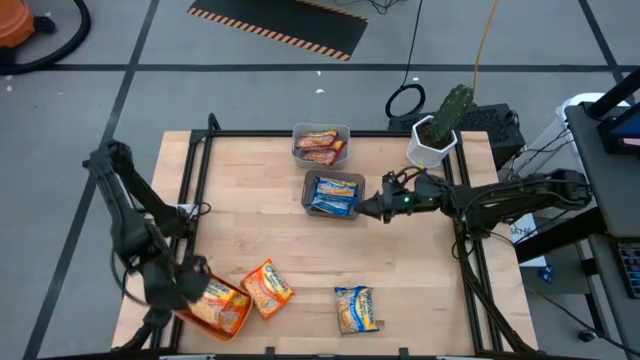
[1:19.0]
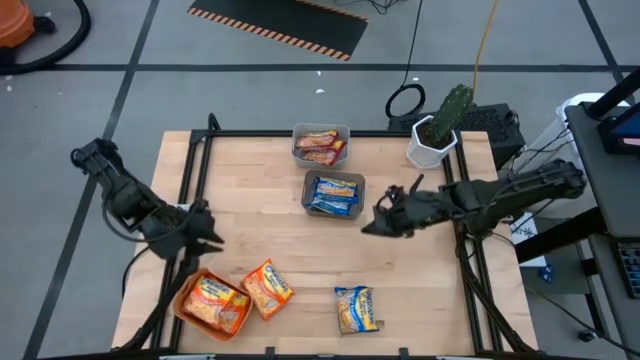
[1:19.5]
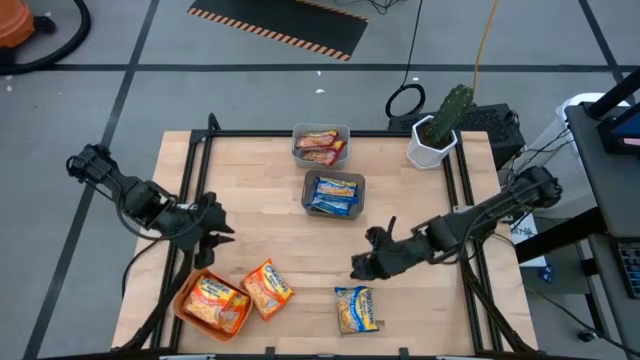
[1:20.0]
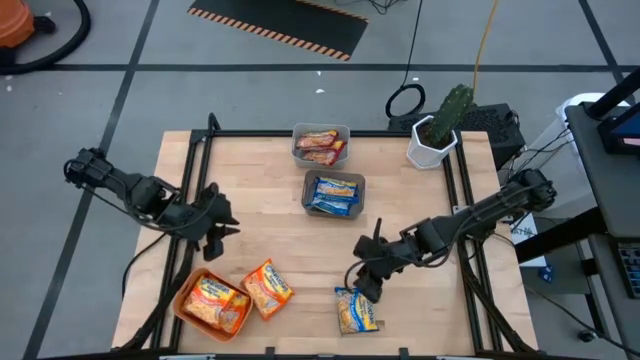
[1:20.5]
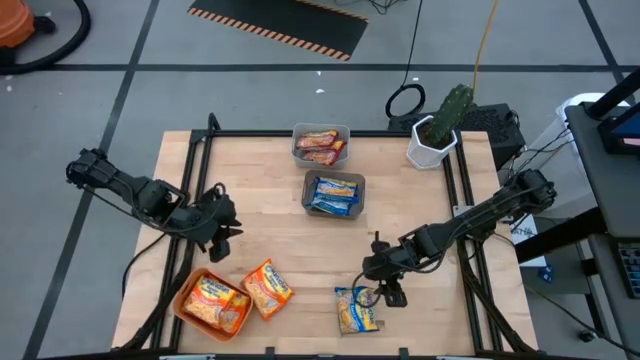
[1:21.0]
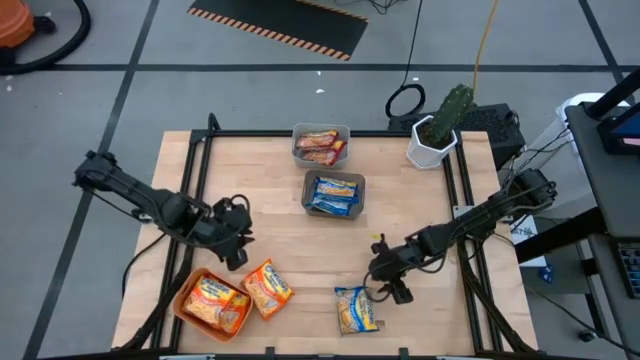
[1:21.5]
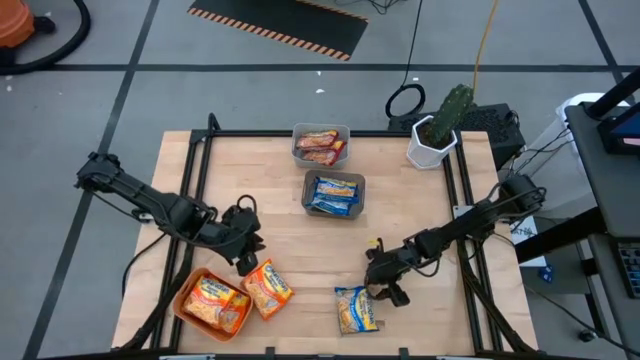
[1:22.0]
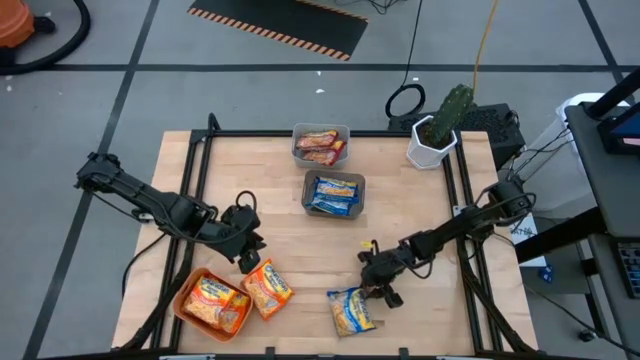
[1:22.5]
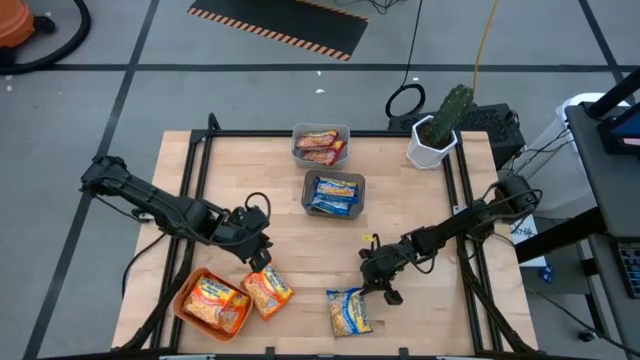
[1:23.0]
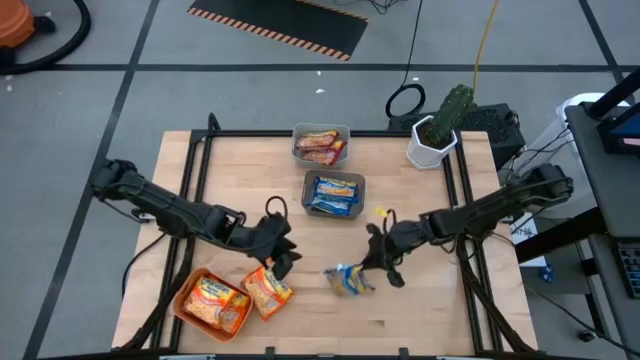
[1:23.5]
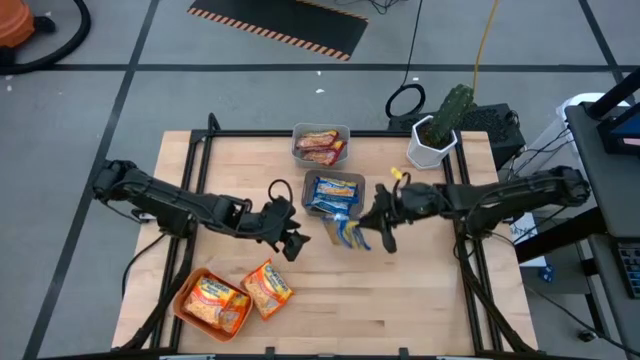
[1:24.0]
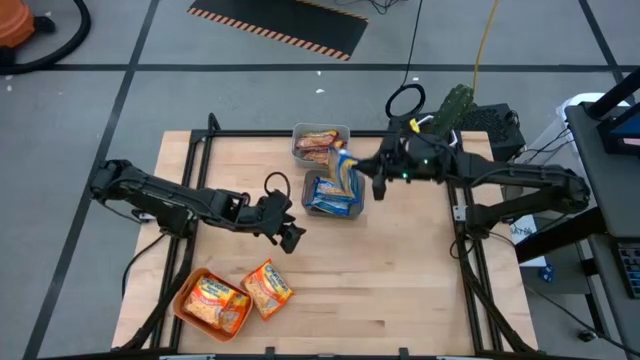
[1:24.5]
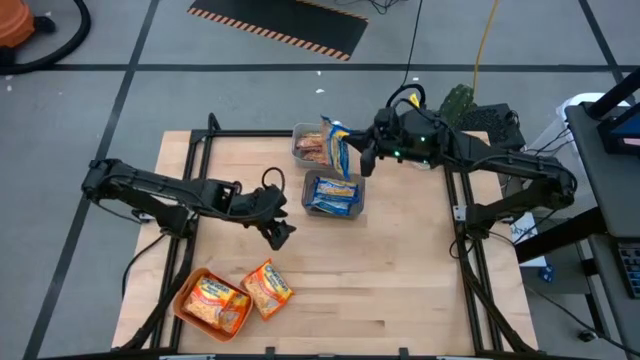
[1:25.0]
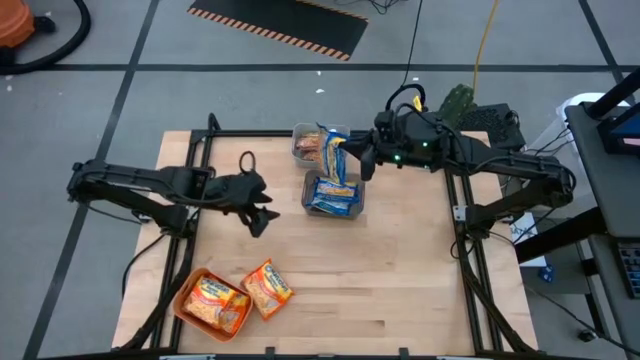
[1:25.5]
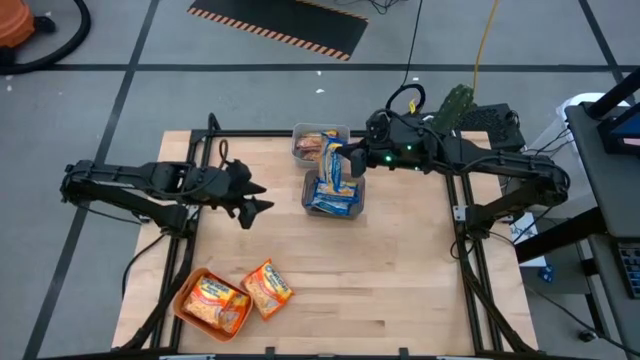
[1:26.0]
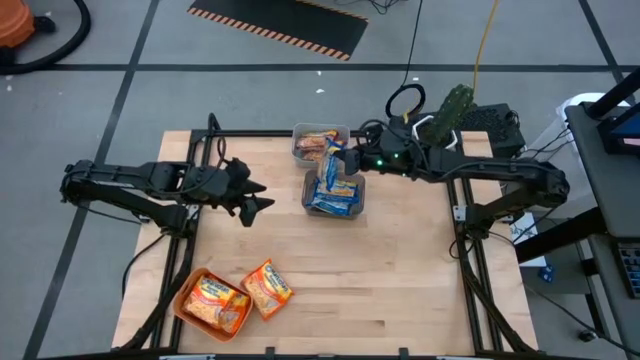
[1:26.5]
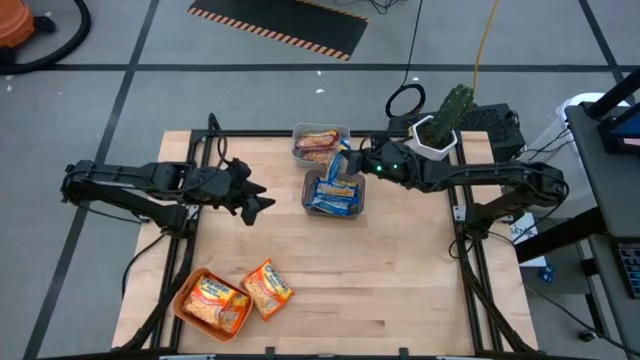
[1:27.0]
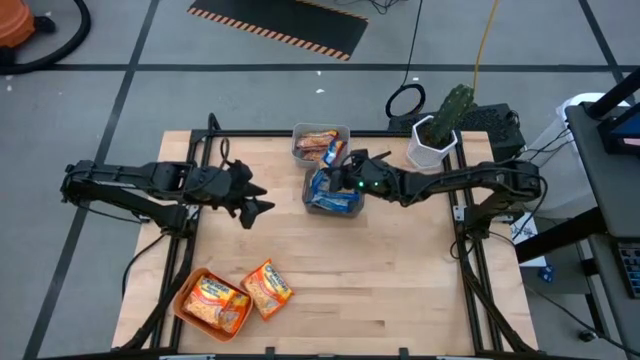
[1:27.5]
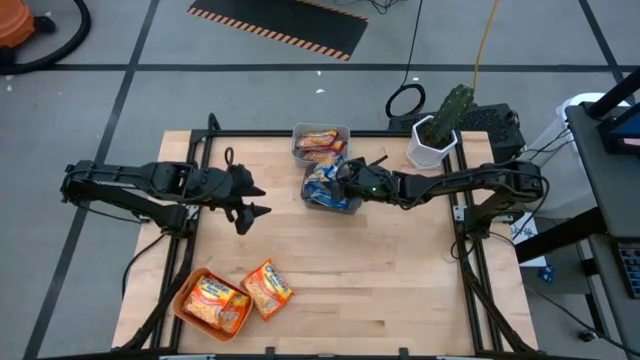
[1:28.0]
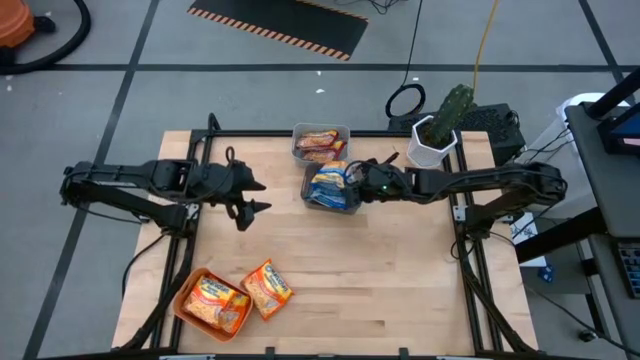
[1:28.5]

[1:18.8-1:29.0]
Task: Sort Maruchan noodles
Put the blue noodle pack into the black bin

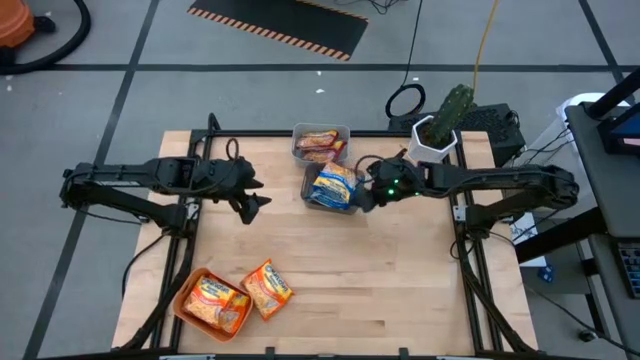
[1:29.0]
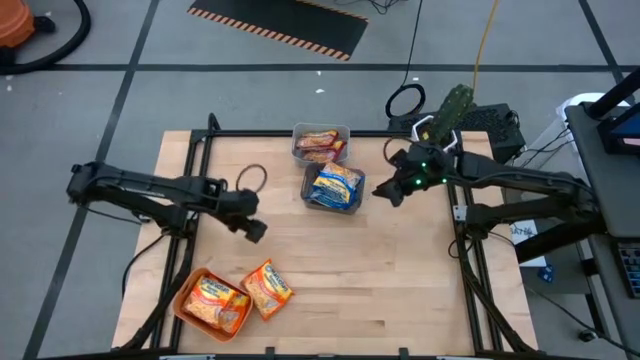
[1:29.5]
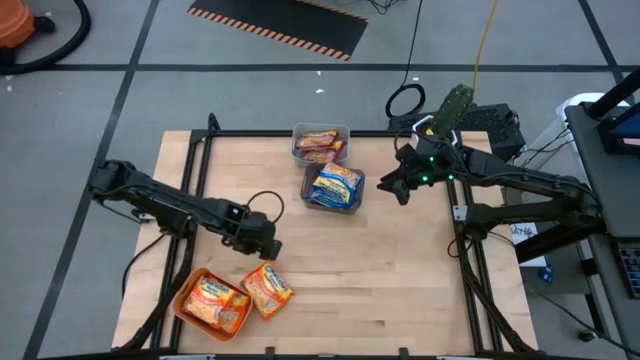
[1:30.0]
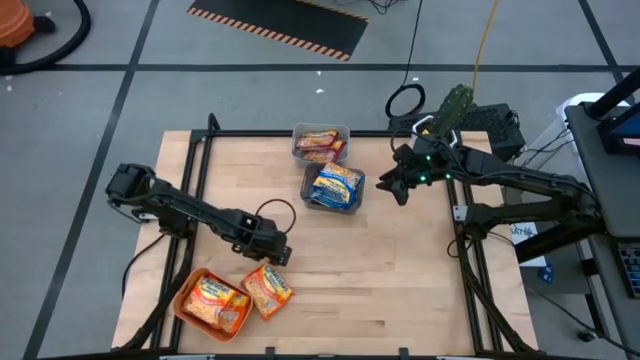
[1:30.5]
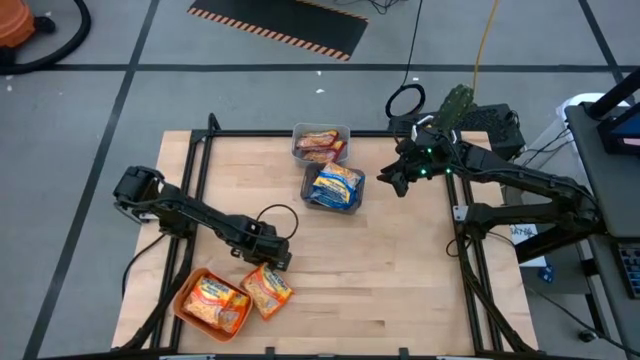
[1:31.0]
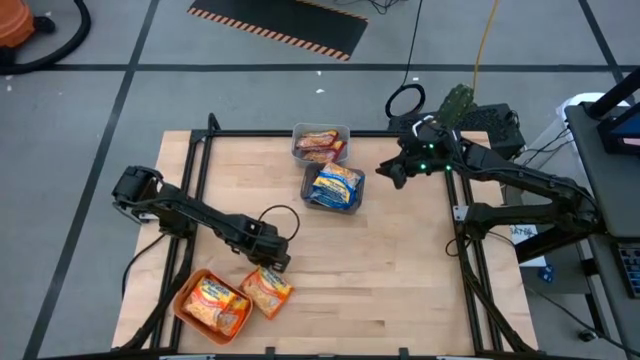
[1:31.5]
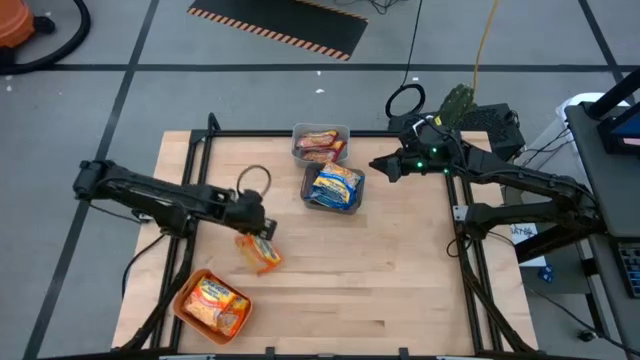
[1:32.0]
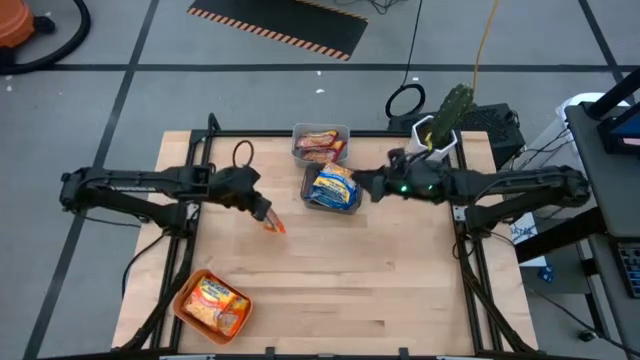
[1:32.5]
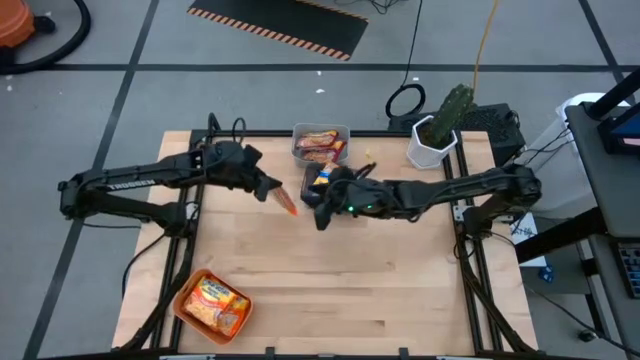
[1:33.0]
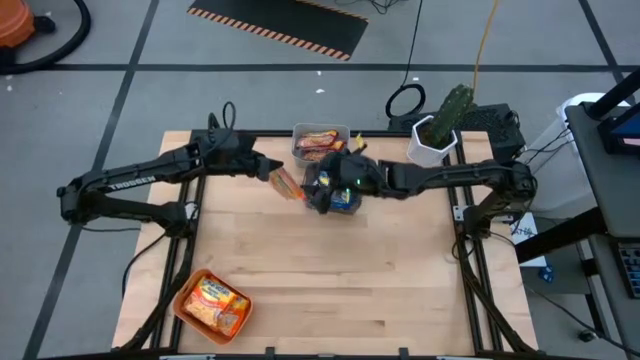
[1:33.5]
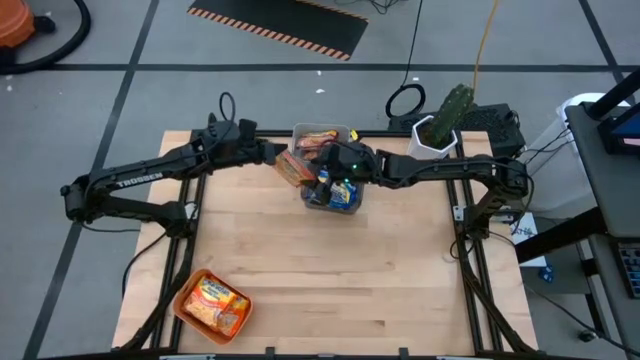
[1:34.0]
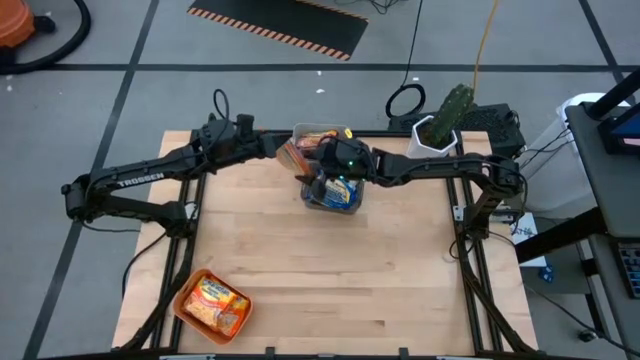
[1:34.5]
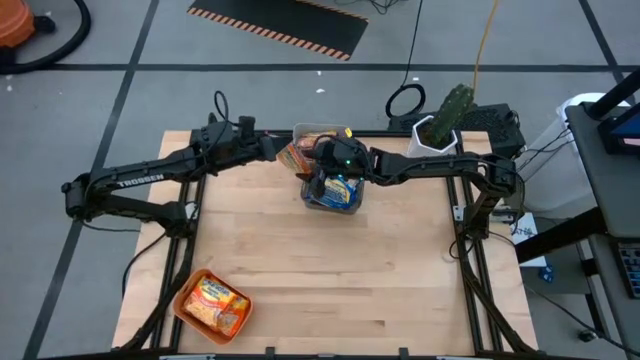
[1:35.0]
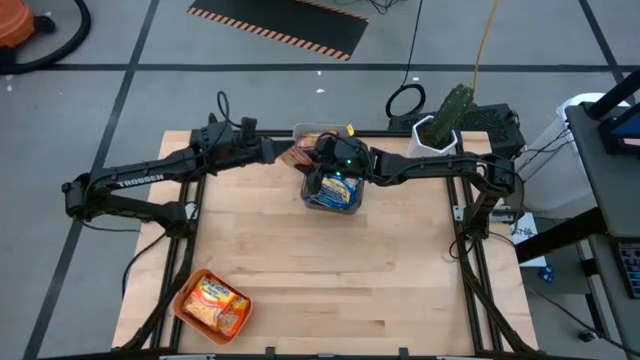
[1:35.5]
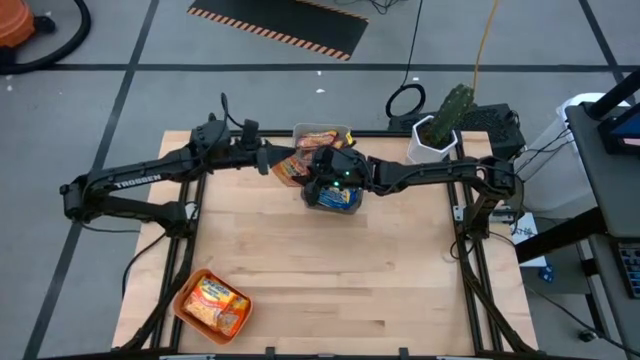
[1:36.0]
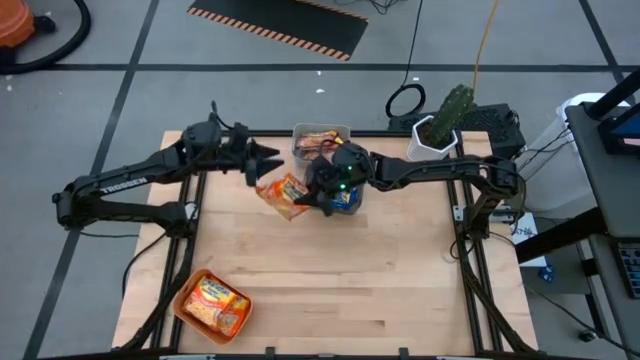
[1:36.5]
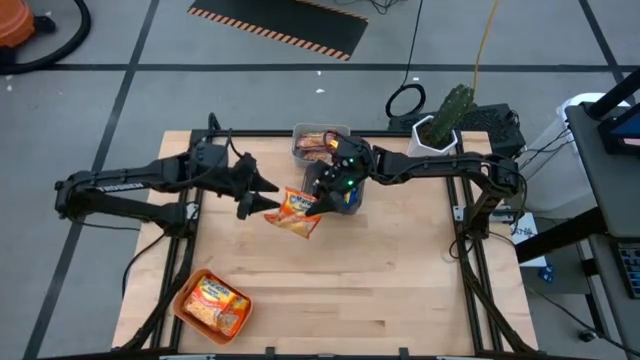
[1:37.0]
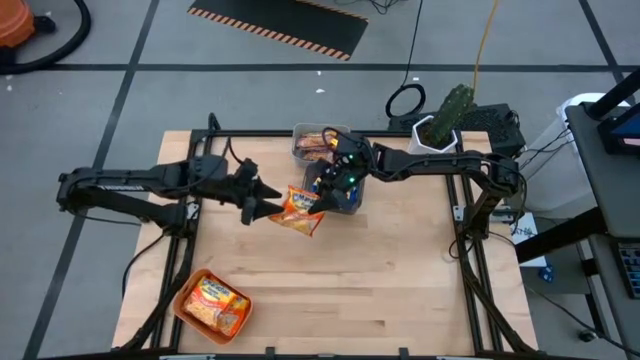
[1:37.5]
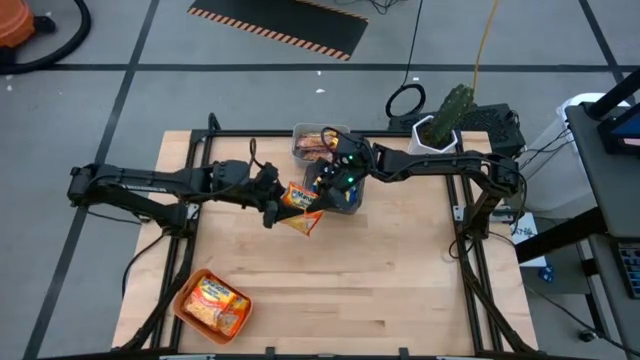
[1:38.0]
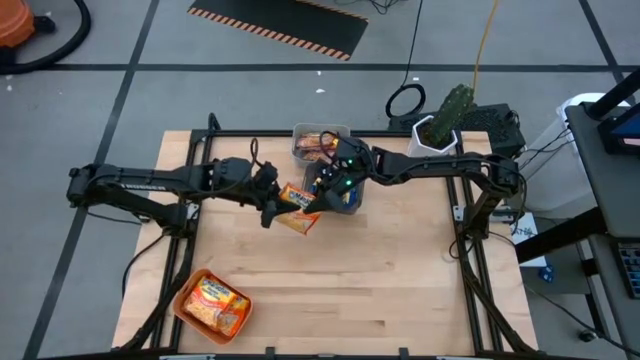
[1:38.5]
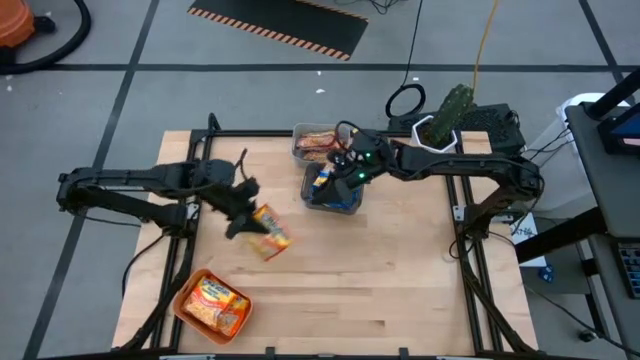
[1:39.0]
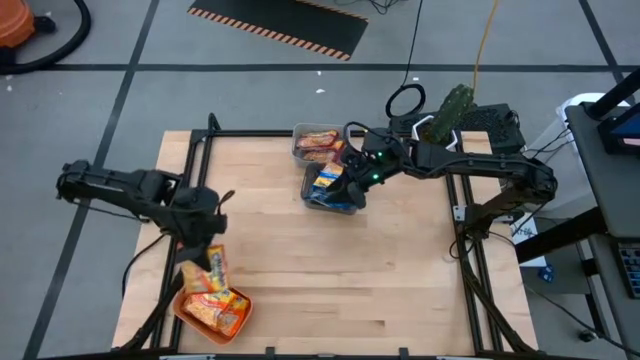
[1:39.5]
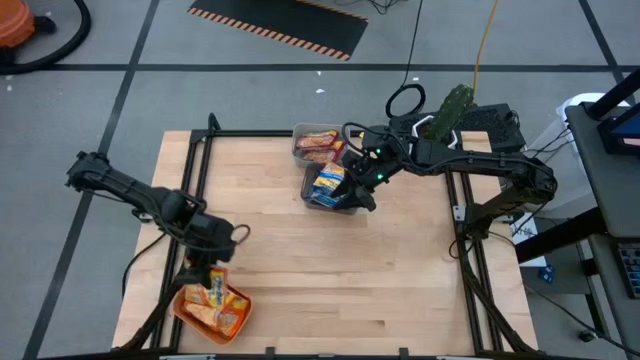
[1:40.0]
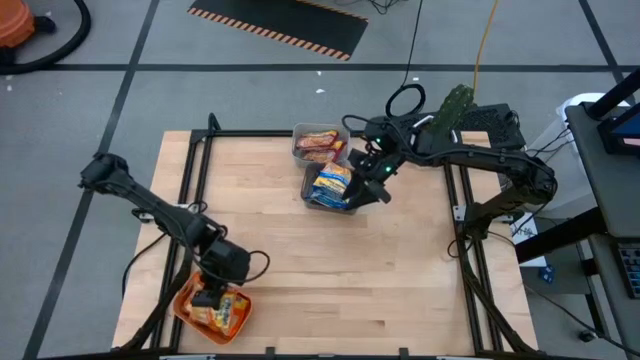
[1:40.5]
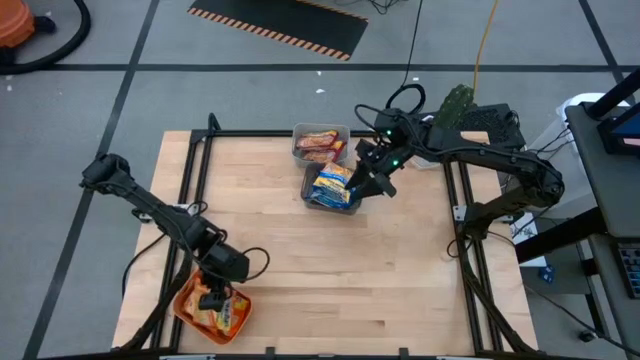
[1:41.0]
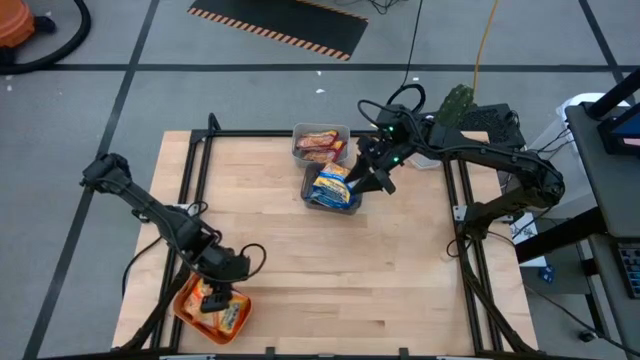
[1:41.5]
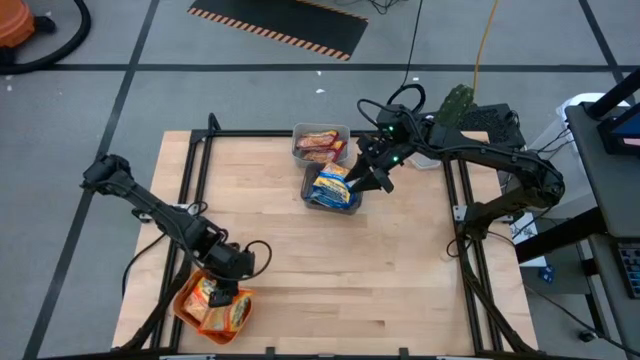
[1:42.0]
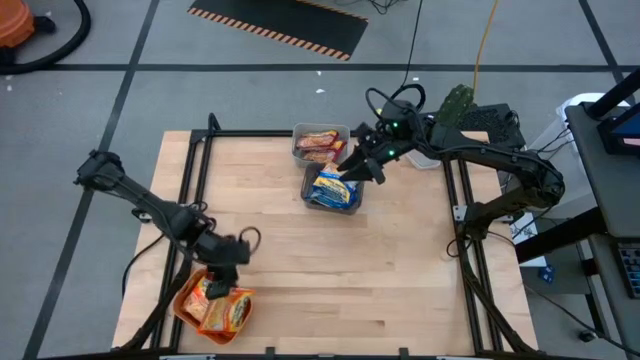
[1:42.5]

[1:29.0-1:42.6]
Put the orange noodle pack into the orange bin
